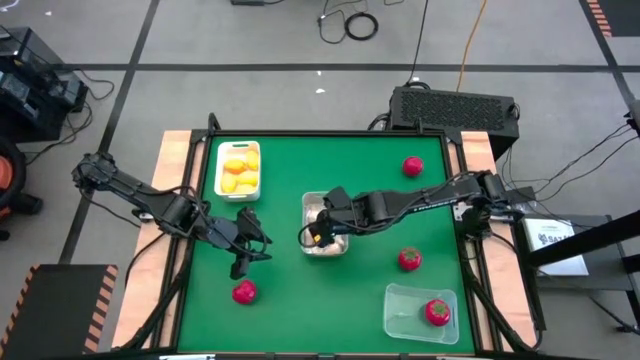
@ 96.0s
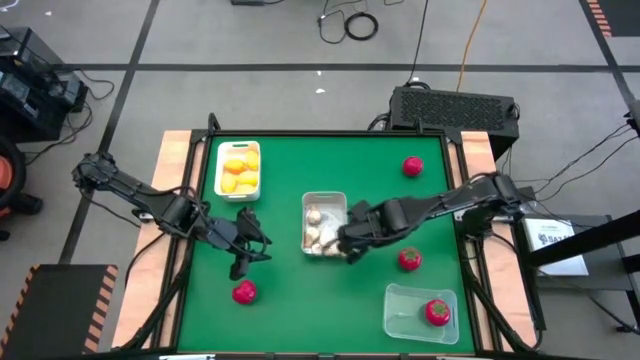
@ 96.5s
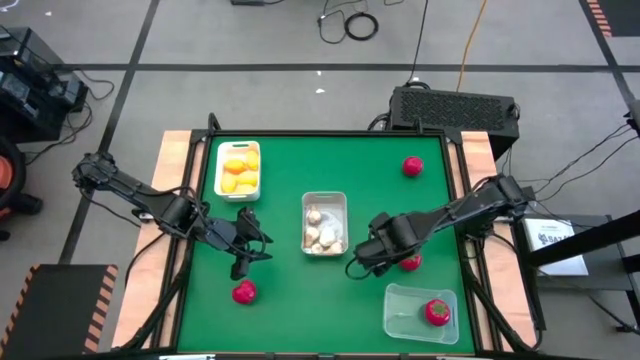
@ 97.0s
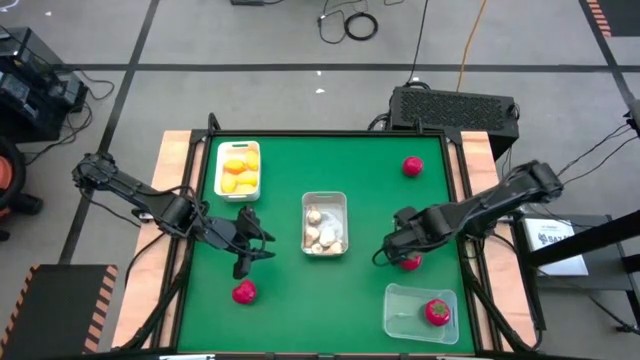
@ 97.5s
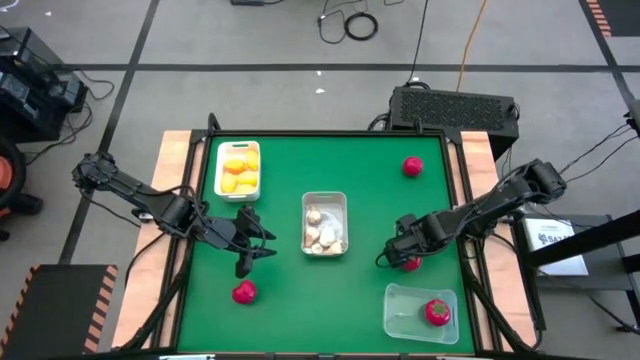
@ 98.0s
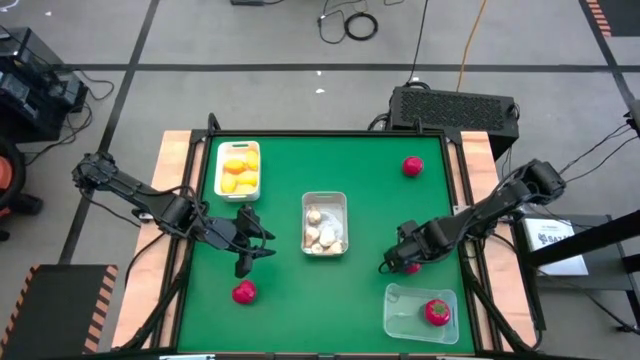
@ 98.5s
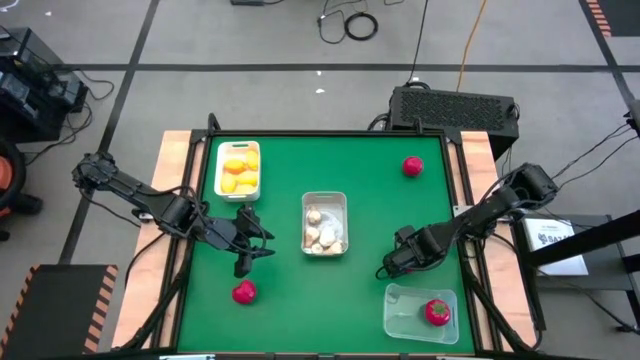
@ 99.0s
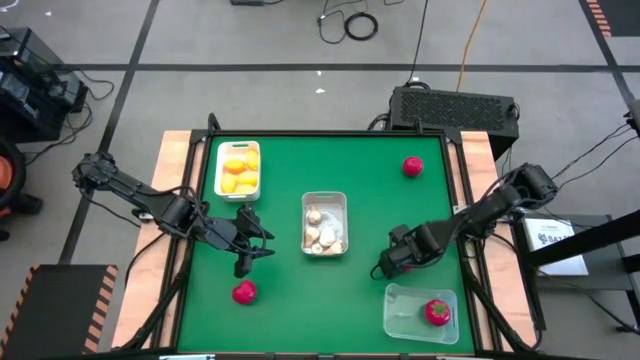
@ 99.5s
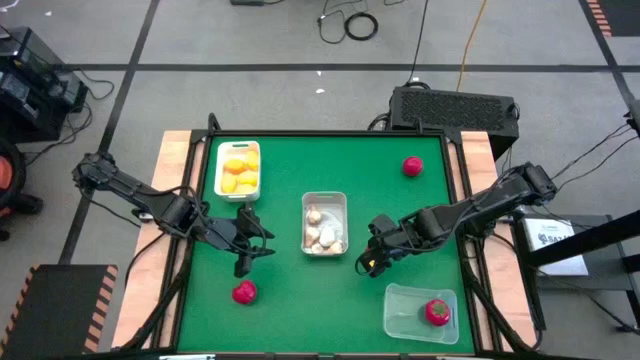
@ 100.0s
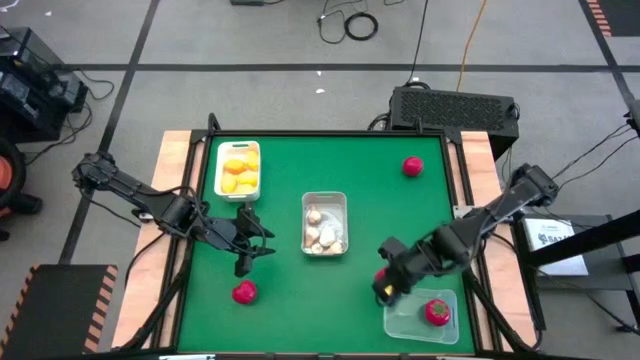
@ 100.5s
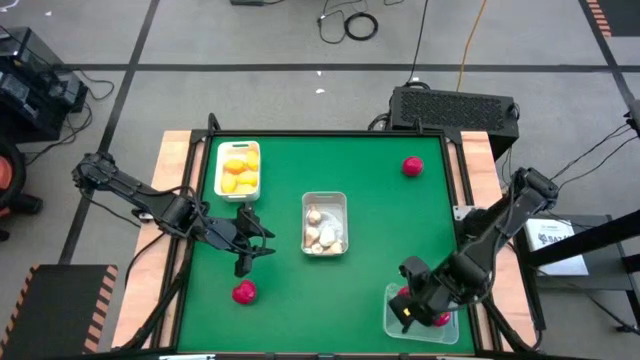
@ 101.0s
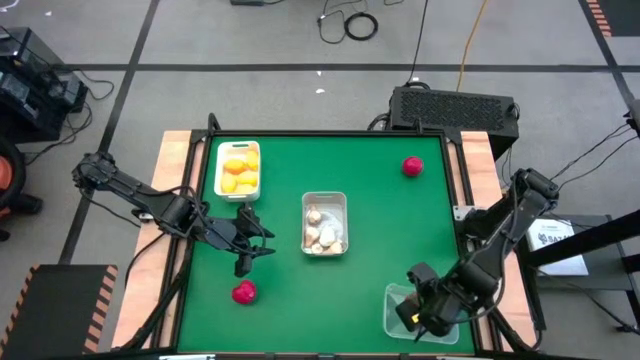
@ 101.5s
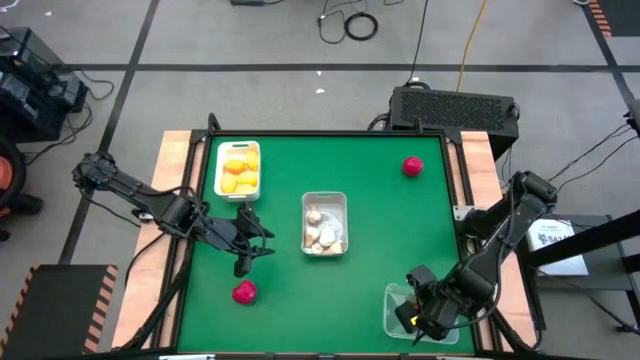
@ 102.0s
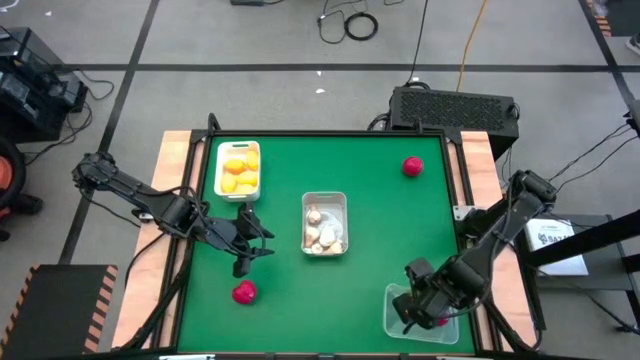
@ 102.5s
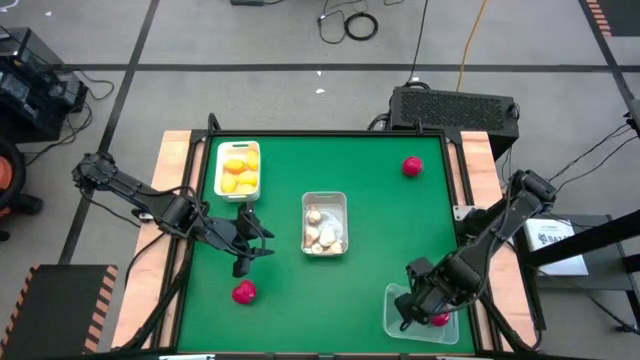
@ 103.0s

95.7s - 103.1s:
Task: Sort produce into baskets
Put the tomato into the transparent bin

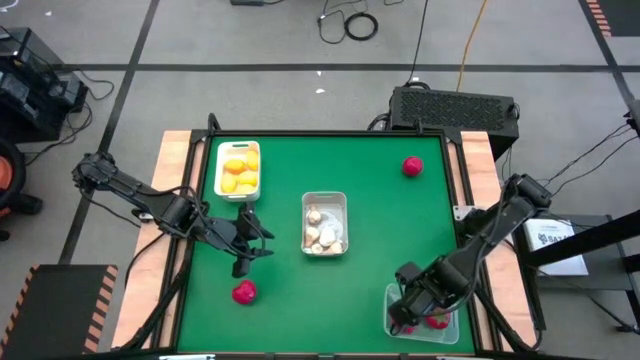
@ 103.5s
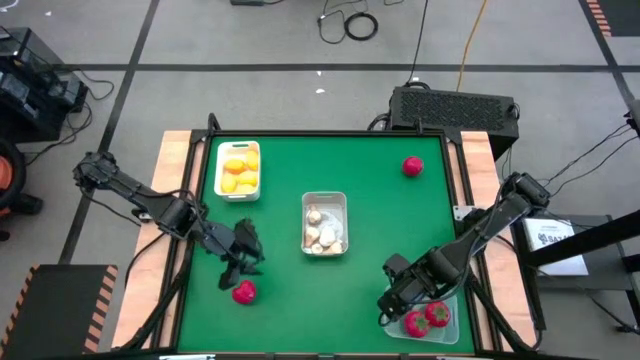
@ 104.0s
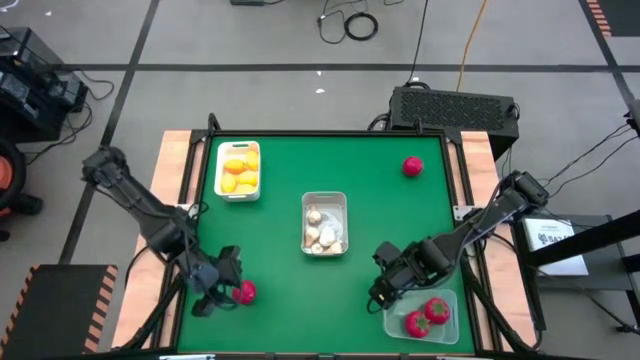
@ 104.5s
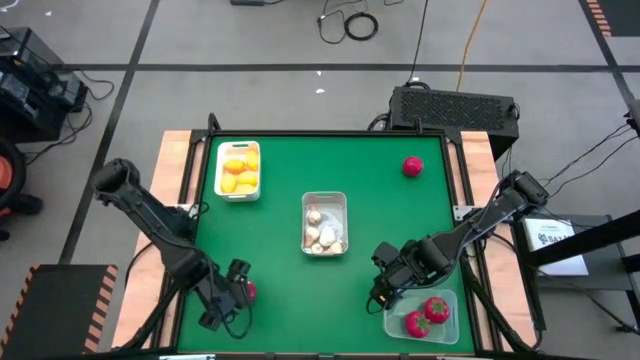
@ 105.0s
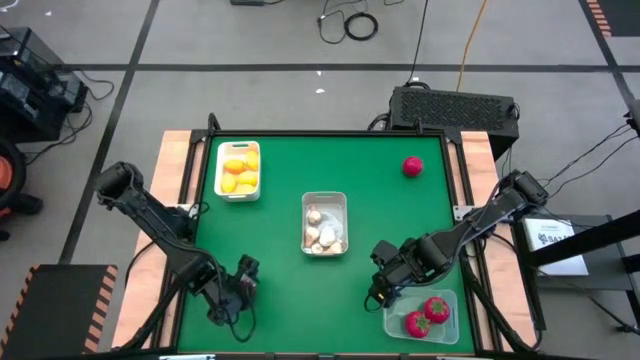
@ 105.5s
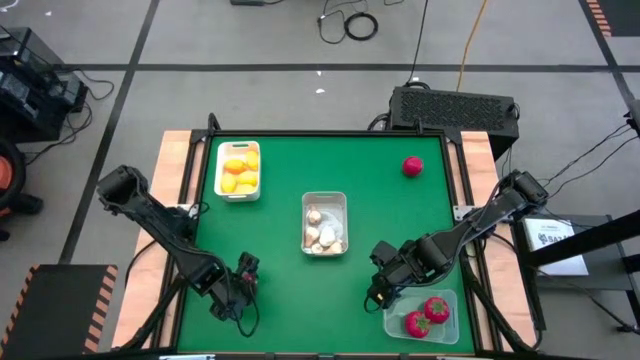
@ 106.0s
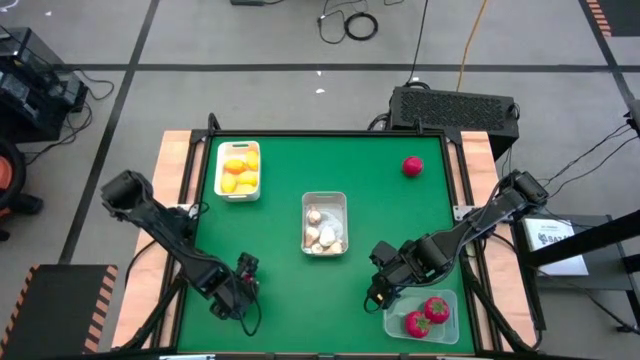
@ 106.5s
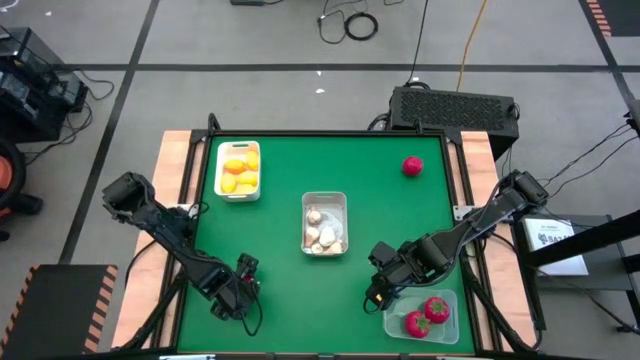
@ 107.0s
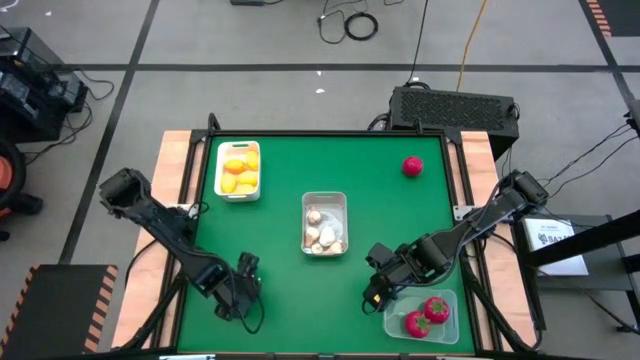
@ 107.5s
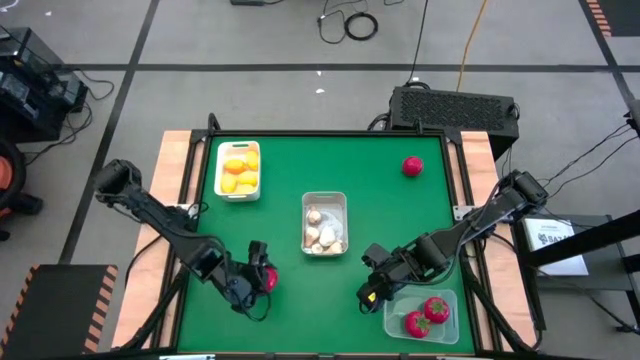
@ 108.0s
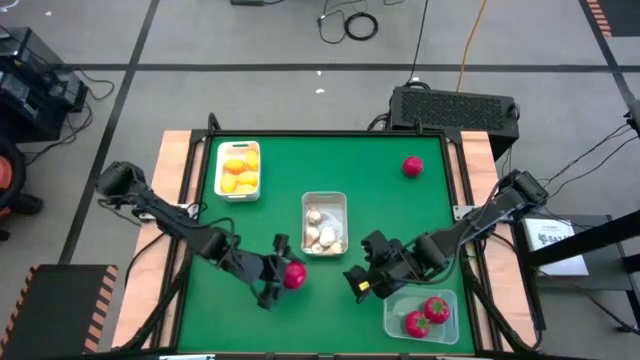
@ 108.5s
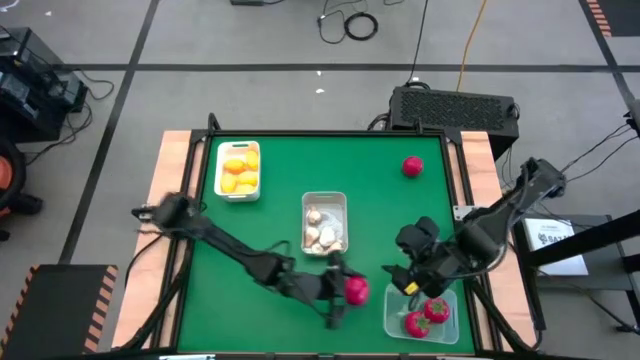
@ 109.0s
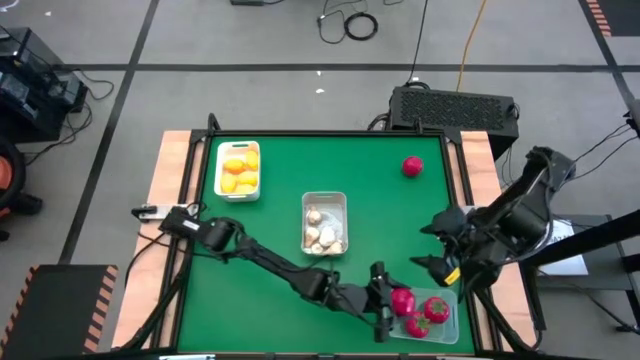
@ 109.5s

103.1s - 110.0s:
Put the tomato into the transparent bin

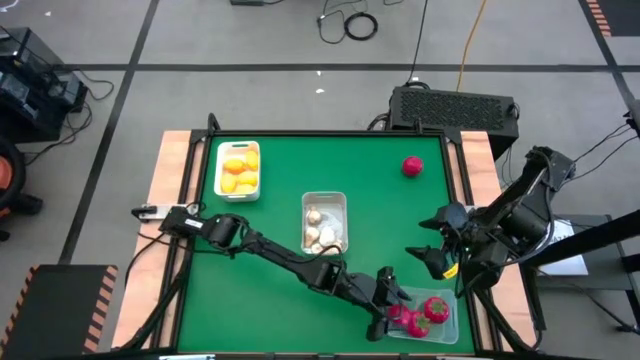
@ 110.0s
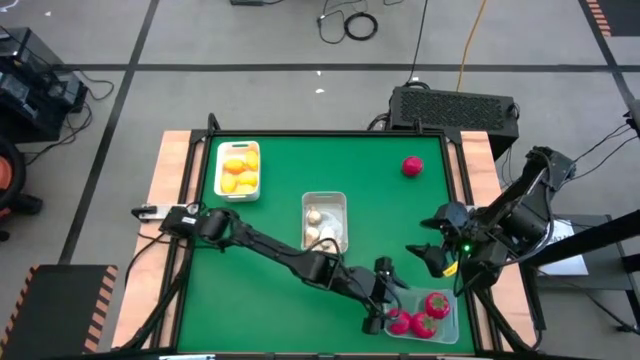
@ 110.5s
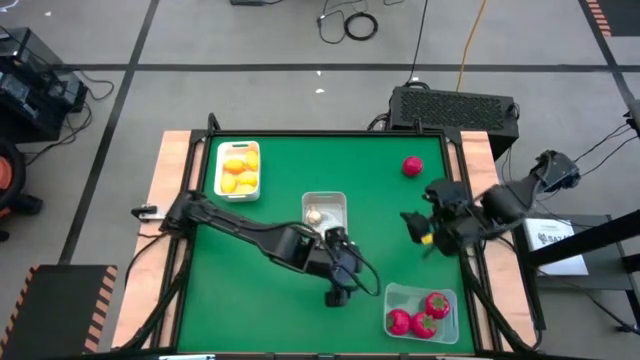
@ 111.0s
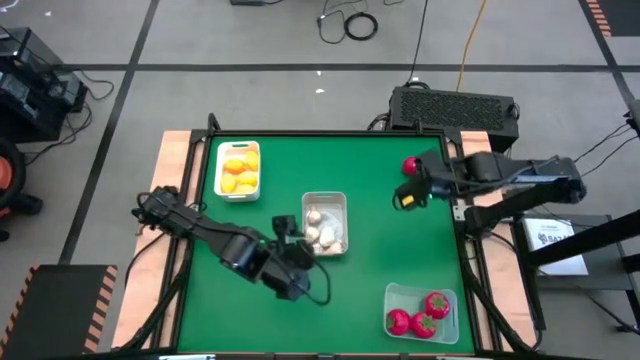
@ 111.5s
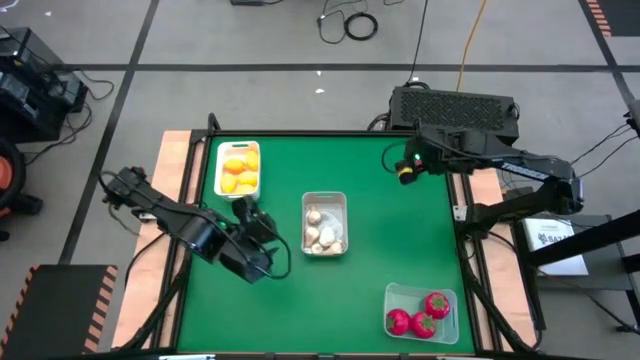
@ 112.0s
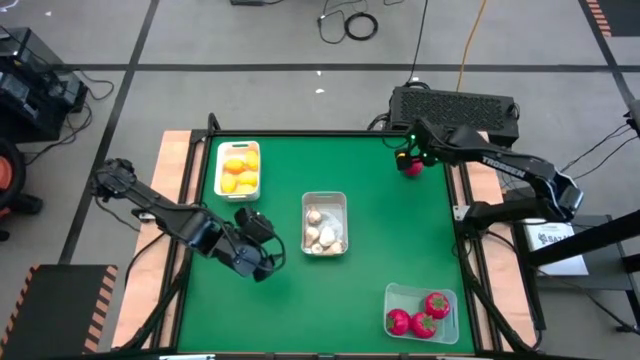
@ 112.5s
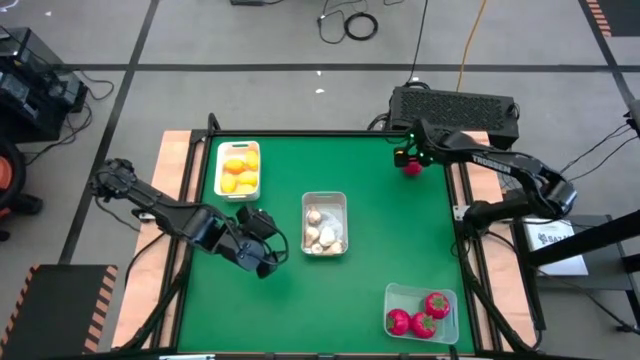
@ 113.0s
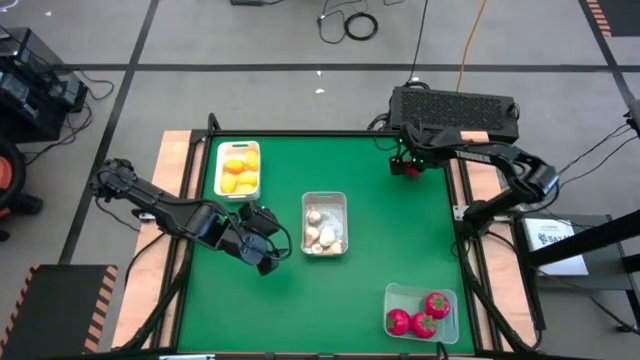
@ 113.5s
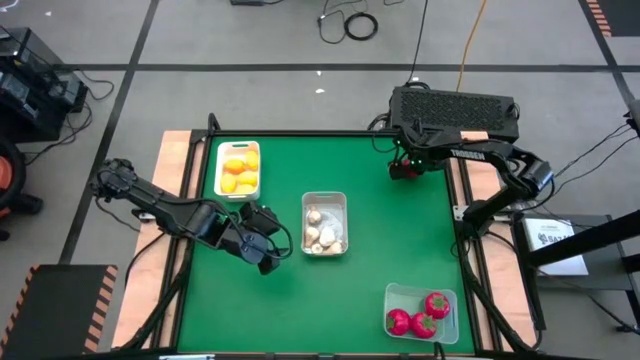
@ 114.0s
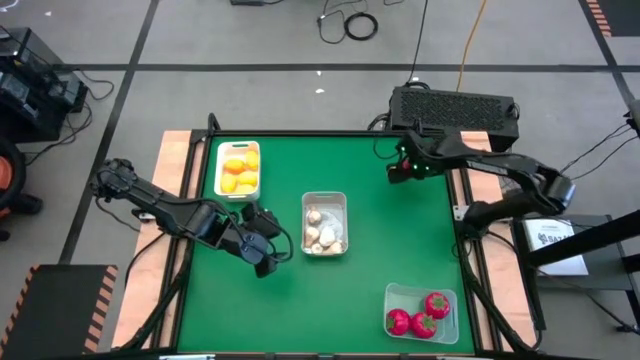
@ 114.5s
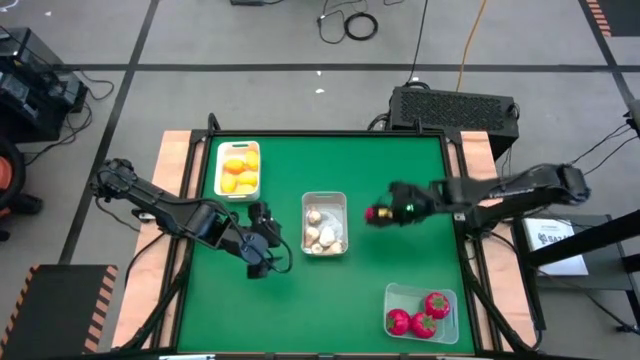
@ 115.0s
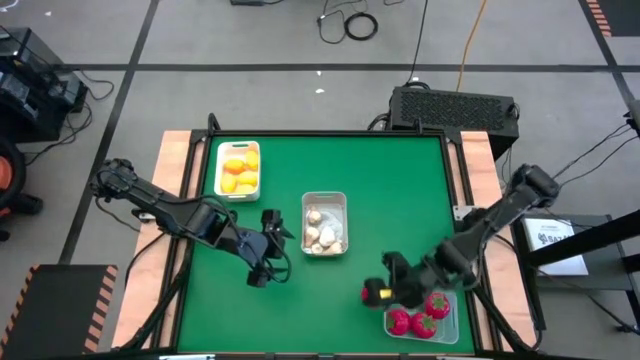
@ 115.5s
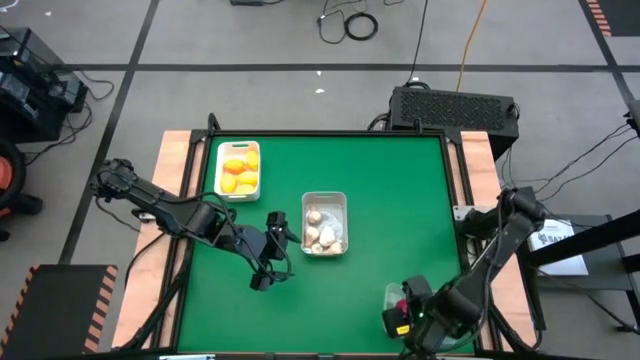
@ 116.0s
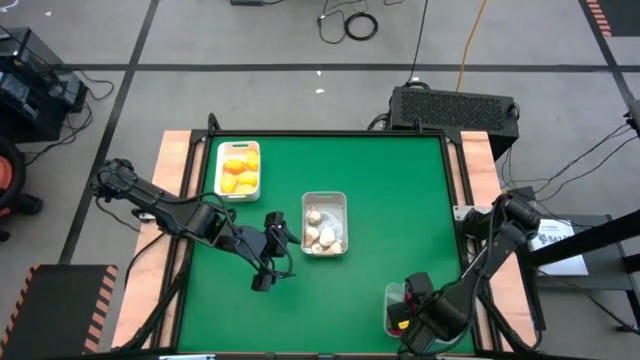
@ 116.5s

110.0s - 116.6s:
Put the tomato into the transparent bin
